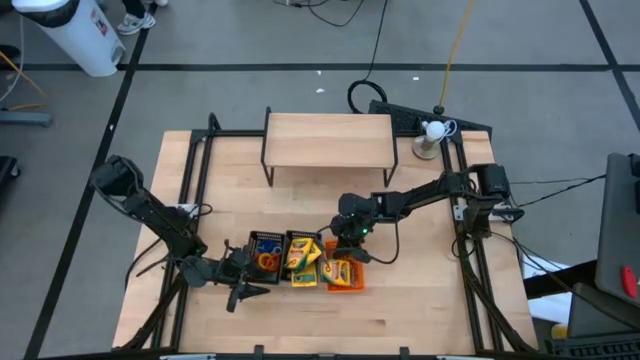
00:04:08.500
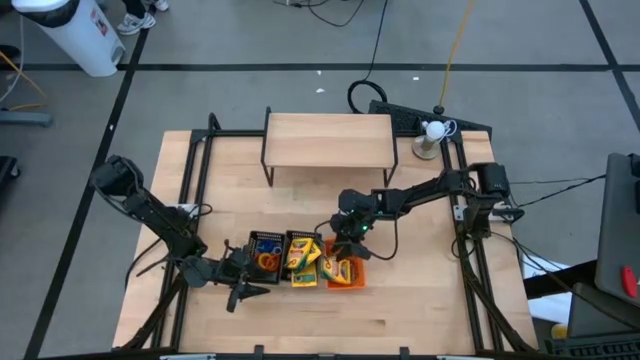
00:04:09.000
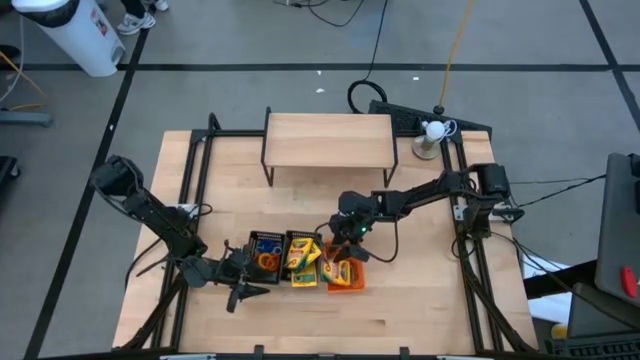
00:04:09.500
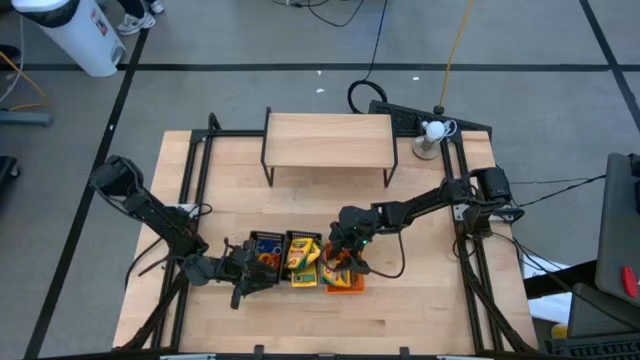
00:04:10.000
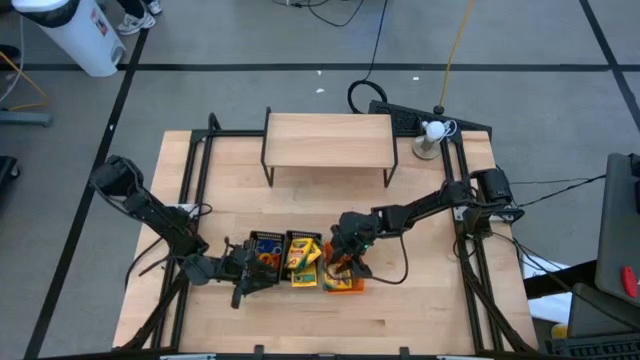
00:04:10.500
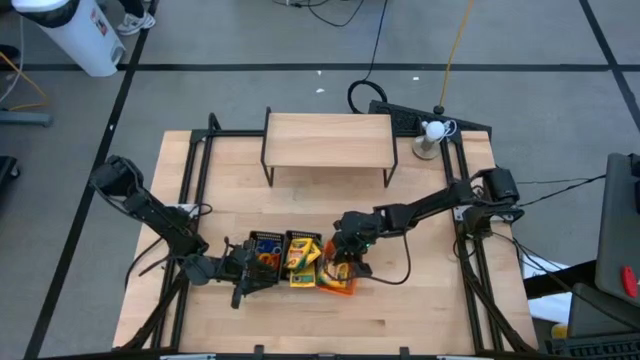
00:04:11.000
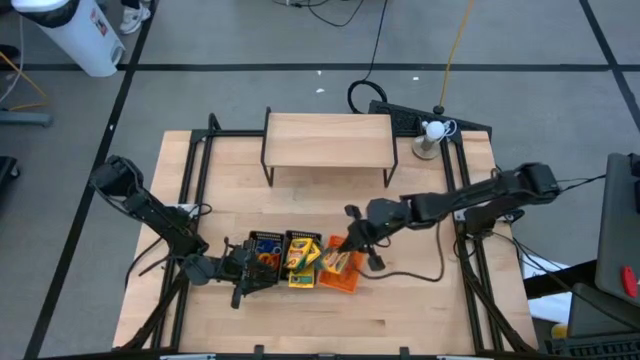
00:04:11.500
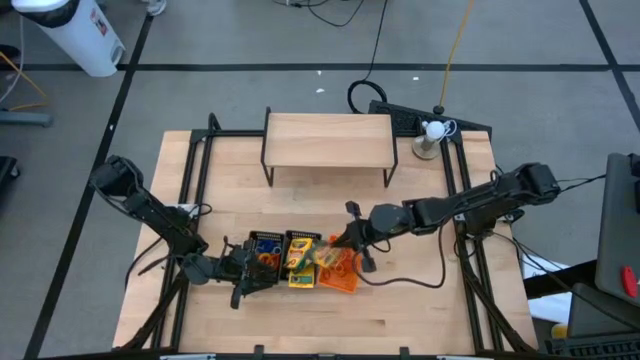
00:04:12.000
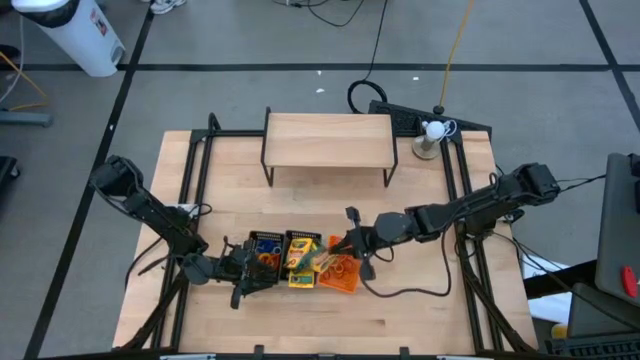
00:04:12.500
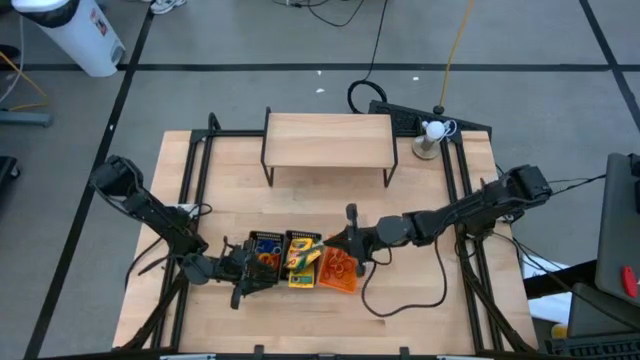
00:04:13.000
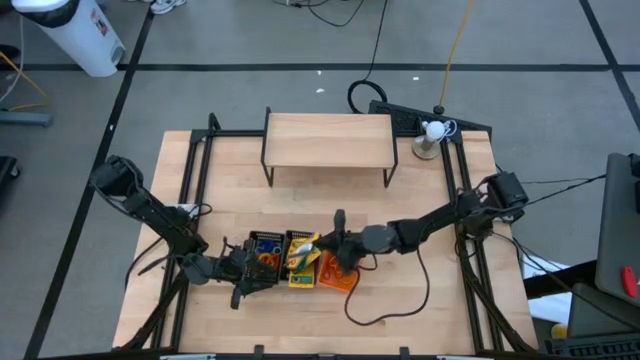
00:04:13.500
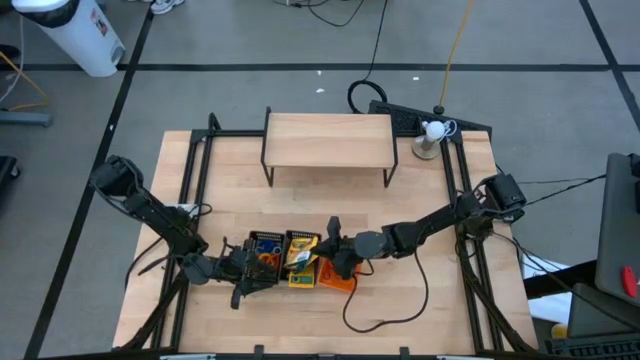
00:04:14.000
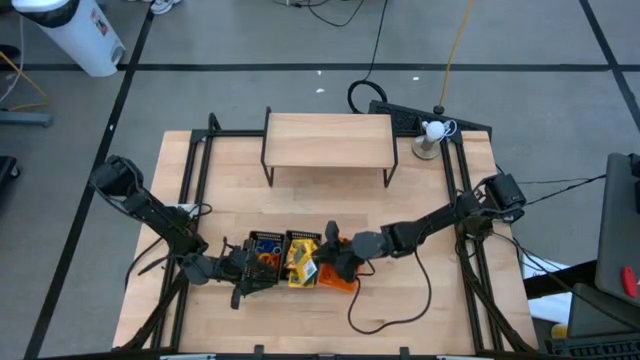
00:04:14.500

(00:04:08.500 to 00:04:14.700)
Task: Pick & Place Office Desk Supplies
Put the crayon box into the right black bin

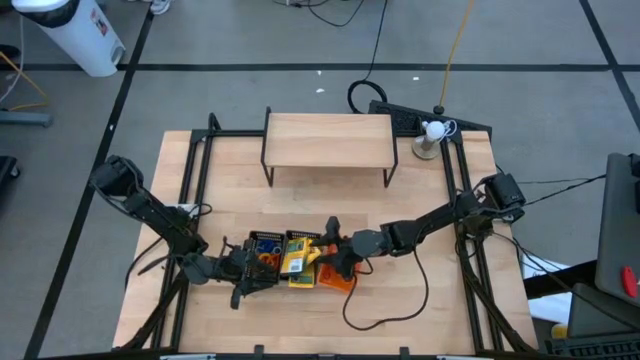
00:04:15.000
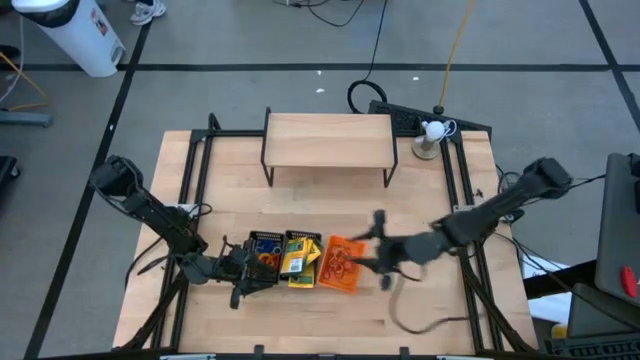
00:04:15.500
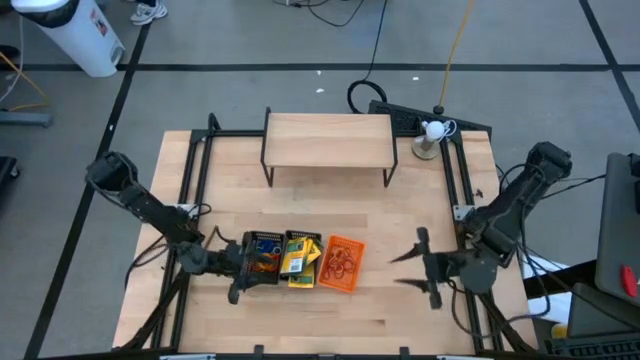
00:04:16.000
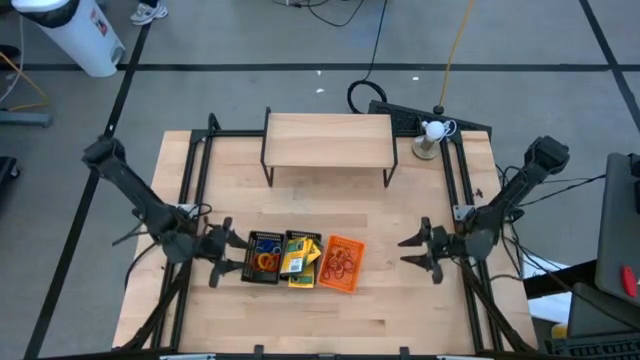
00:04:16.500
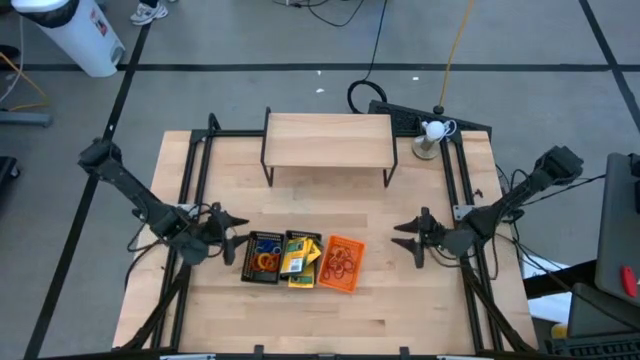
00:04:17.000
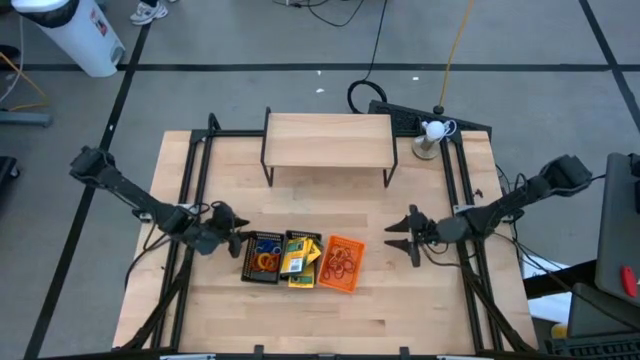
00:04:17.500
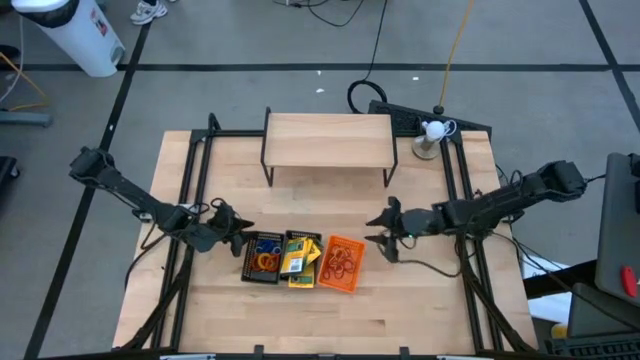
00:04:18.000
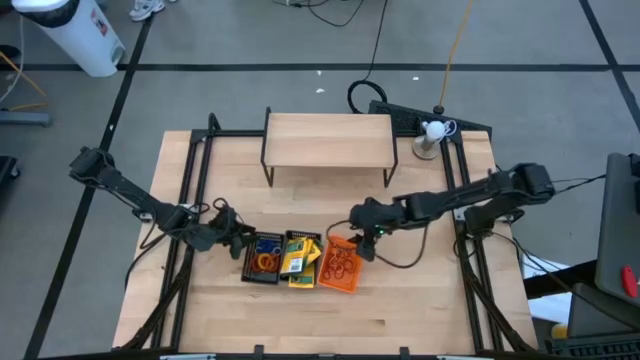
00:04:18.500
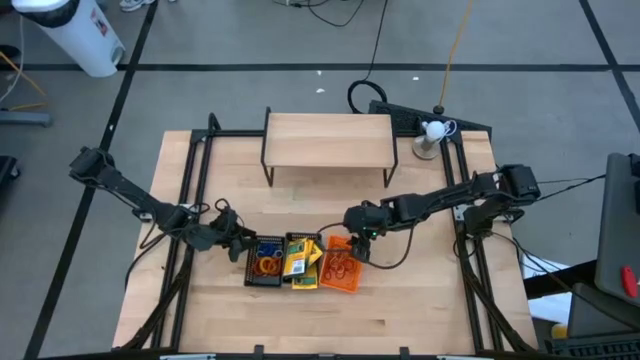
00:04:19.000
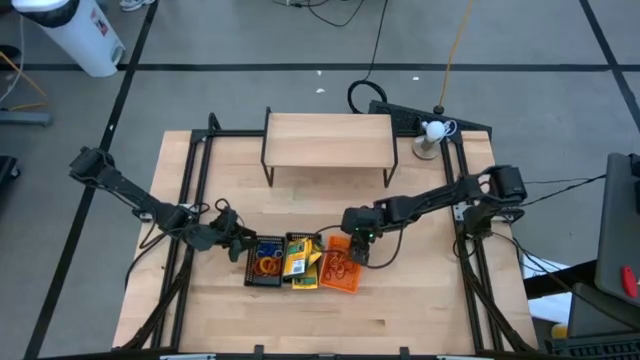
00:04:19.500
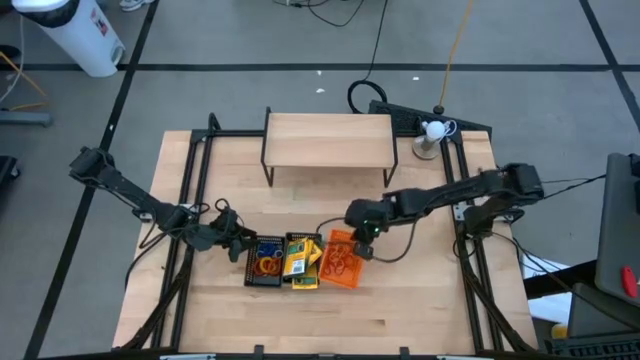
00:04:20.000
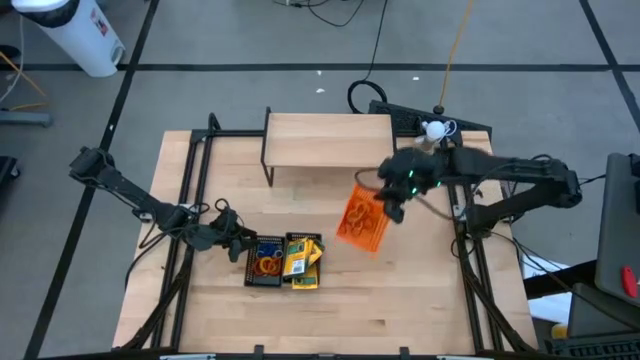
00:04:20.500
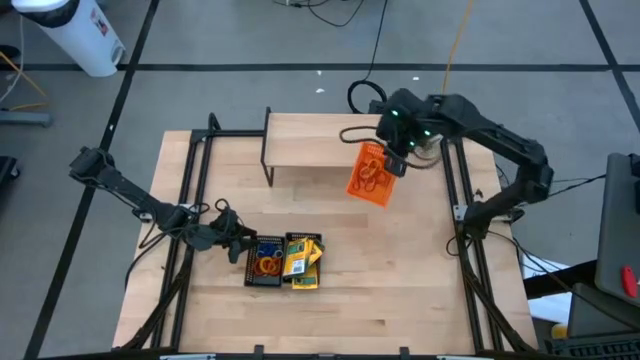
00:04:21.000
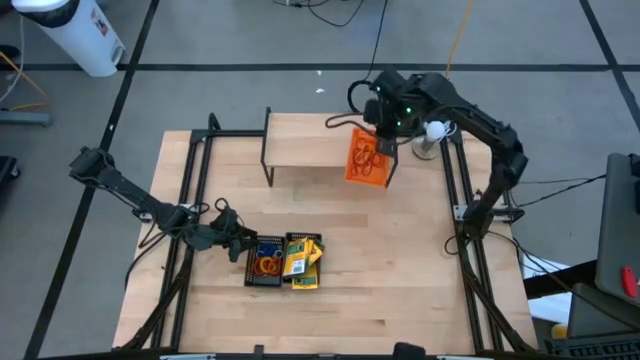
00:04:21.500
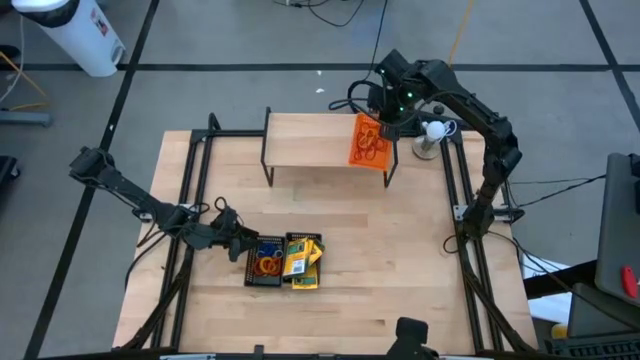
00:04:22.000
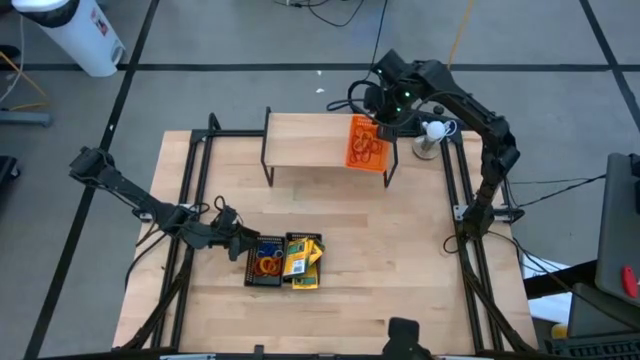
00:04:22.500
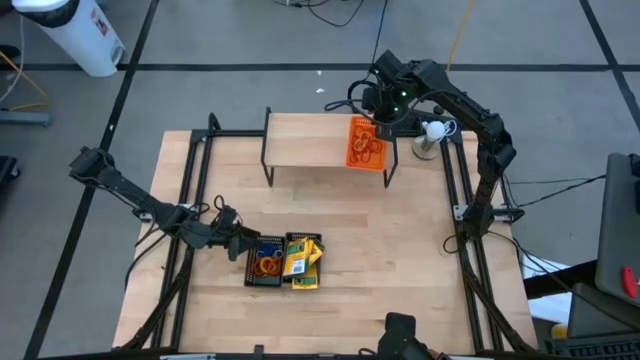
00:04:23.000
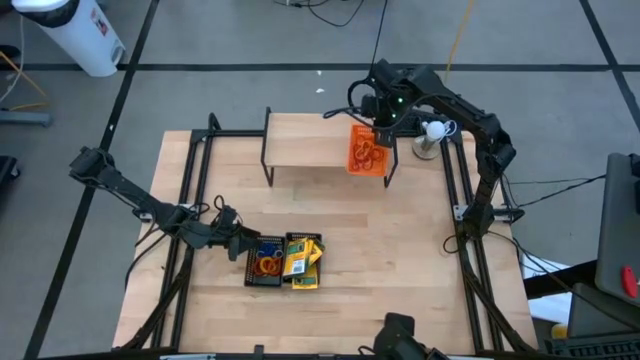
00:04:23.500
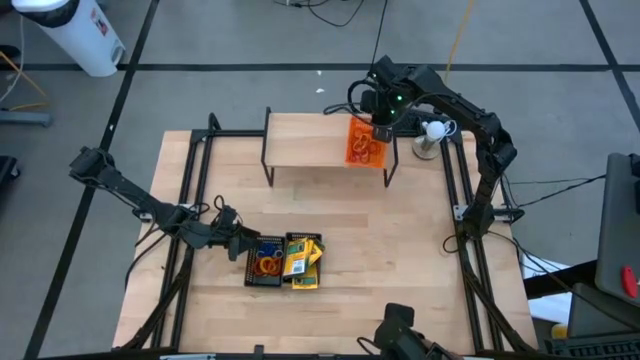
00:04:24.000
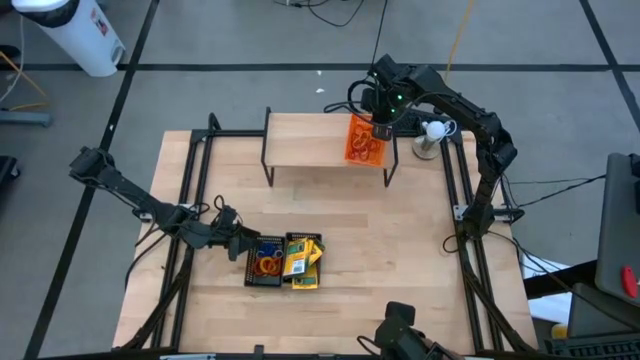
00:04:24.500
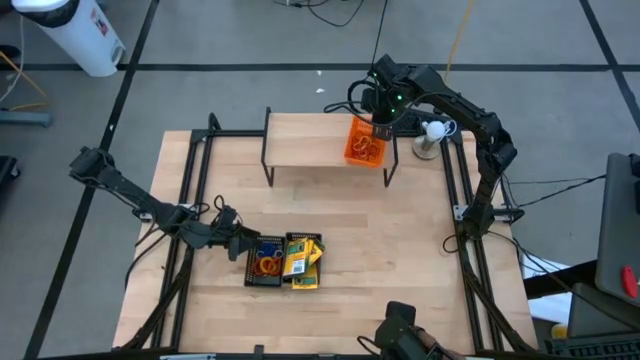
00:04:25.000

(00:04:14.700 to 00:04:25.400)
Put the orange bin with rubber bands on the shelf

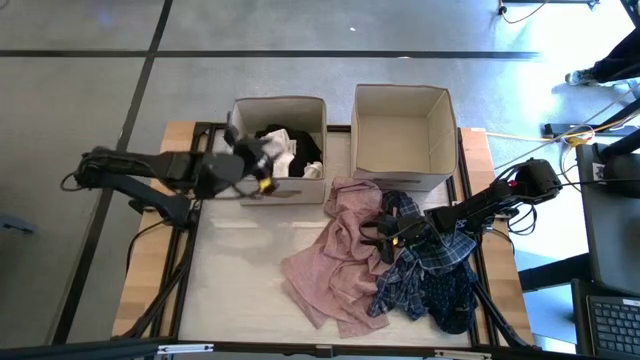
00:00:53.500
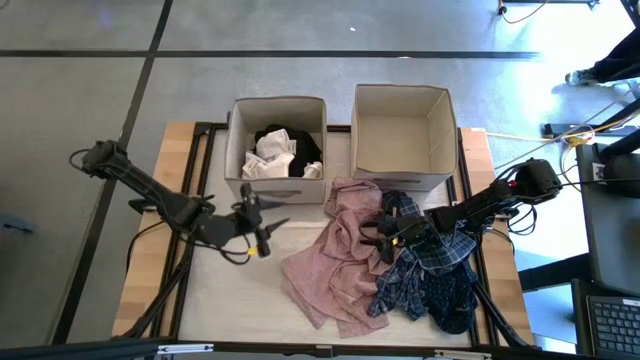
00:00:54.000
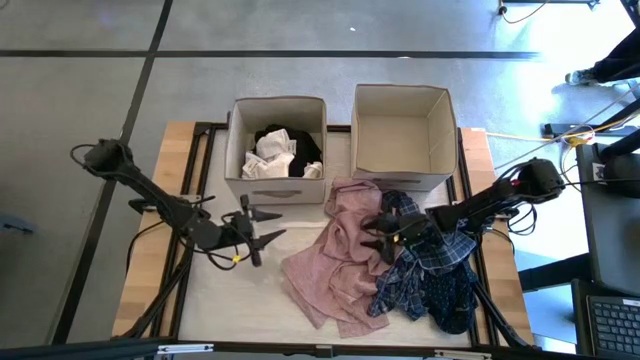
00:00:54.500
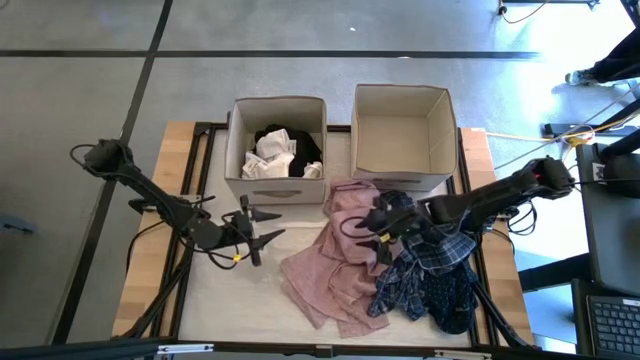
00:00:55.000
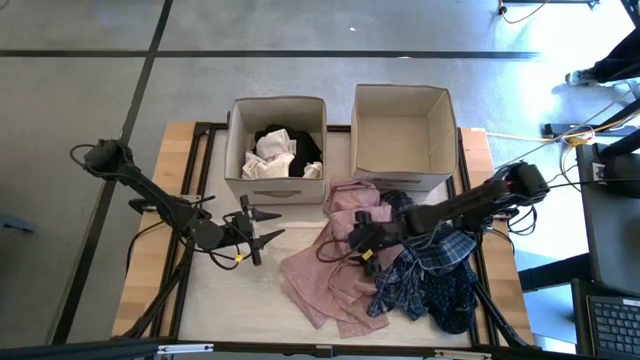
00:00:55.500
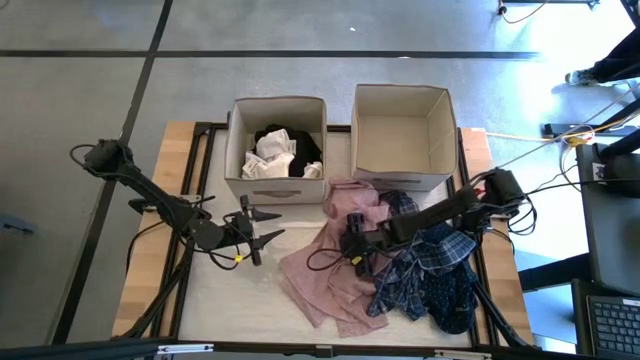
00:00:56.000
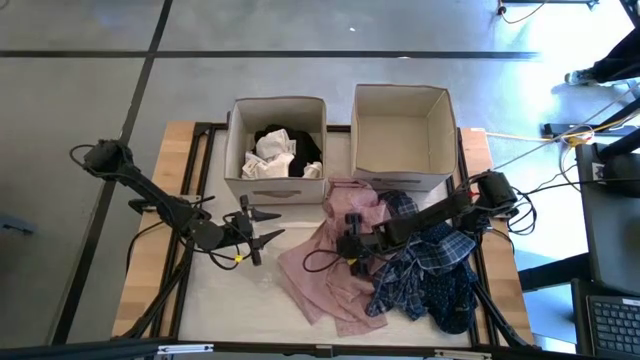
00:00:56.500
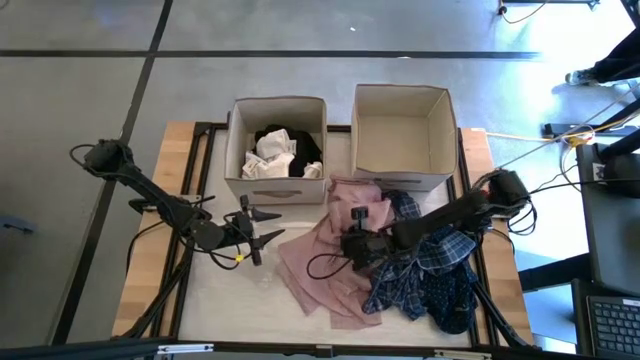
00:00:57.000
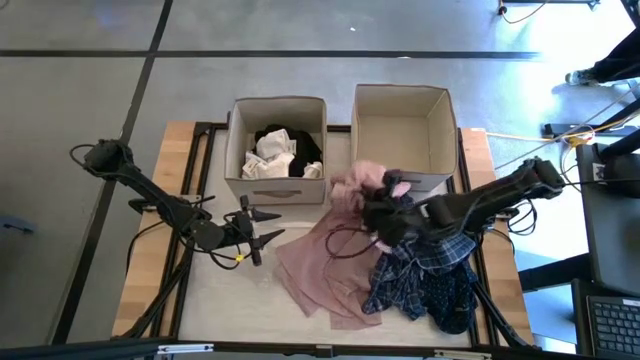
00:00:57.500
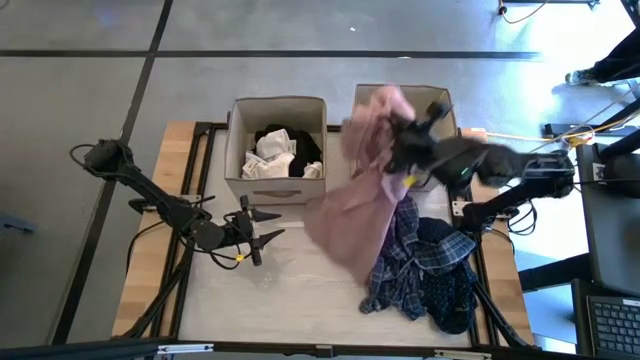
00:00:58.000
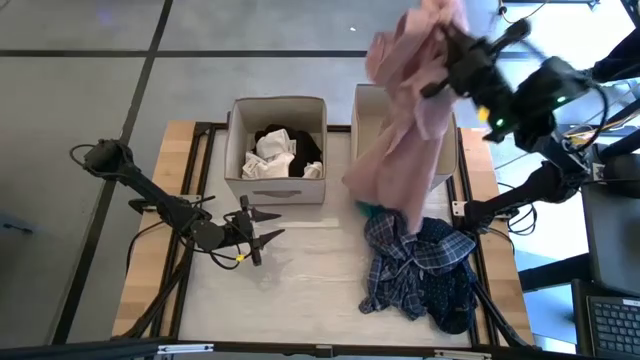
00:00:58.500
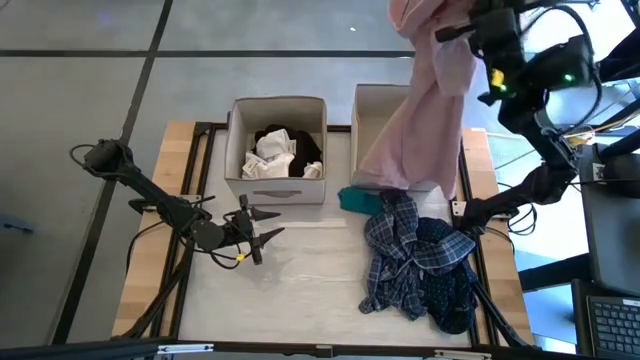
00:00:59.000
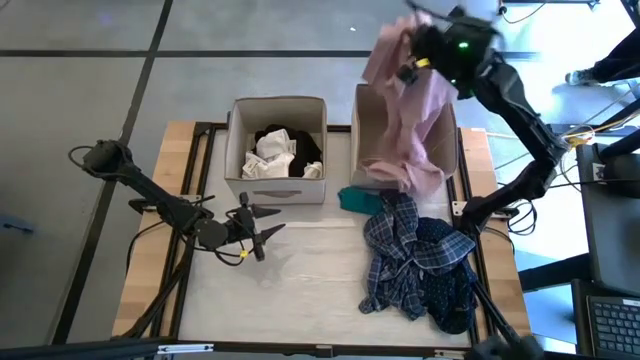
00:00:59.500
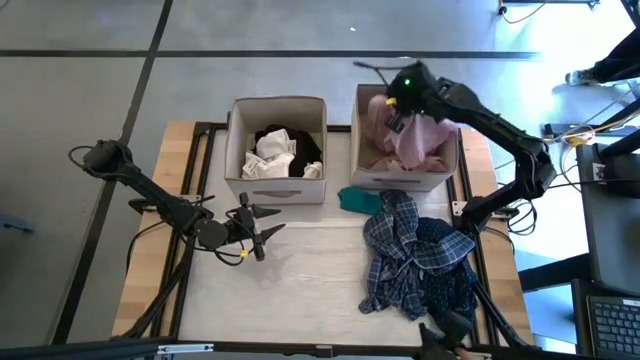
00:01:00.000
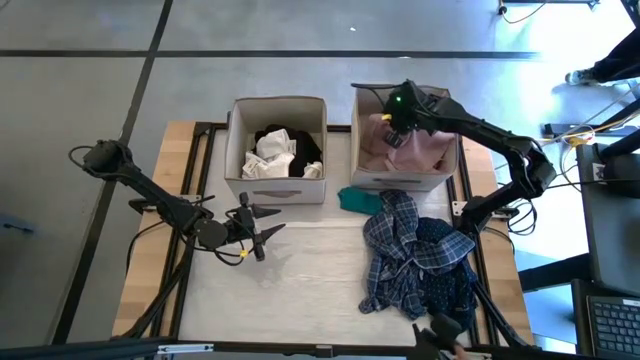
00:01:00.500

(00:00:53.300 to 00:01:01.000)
Task: Sort clothes
Put the pink polo shirt into the right laundry organizer
